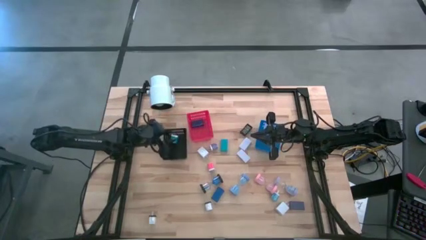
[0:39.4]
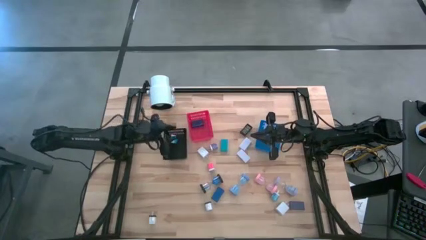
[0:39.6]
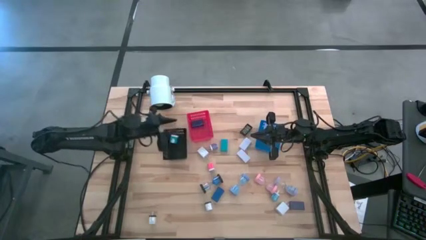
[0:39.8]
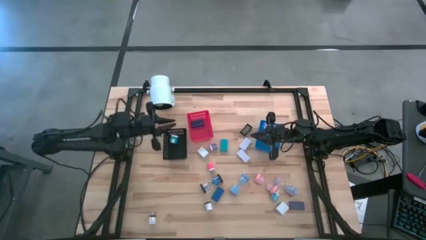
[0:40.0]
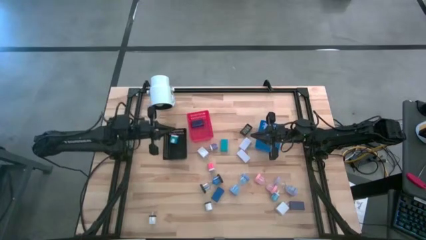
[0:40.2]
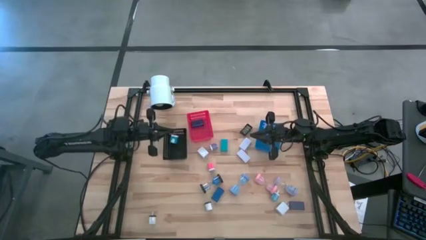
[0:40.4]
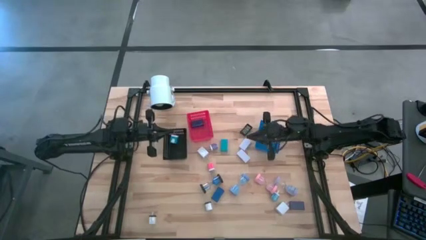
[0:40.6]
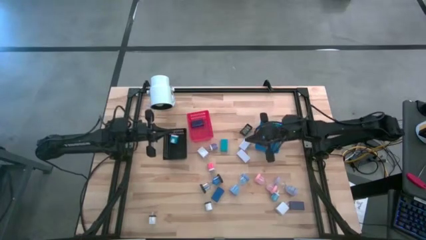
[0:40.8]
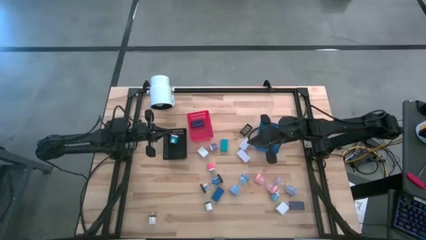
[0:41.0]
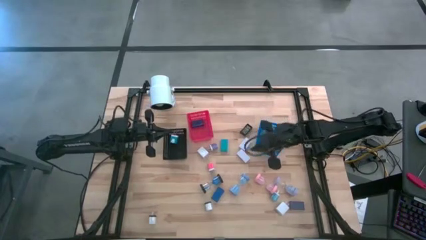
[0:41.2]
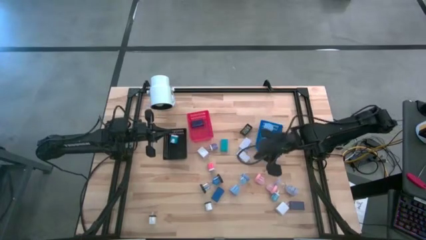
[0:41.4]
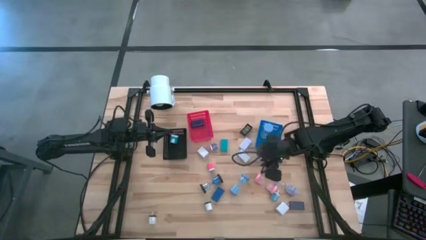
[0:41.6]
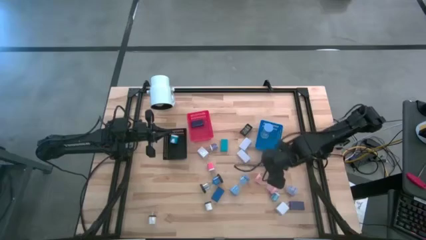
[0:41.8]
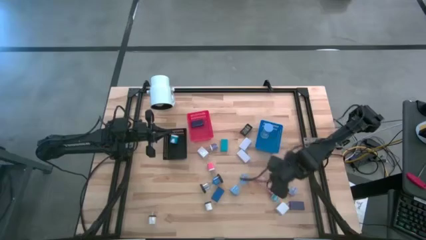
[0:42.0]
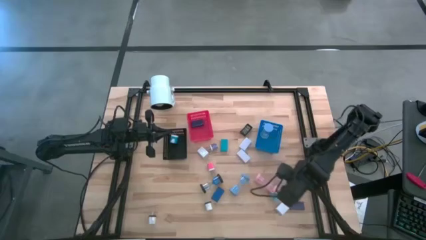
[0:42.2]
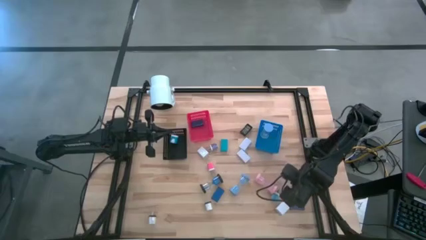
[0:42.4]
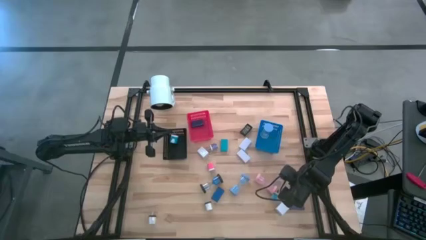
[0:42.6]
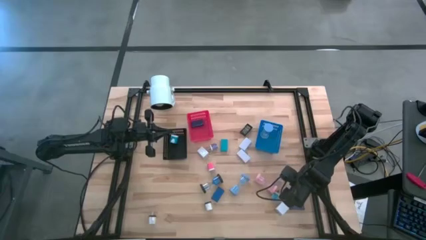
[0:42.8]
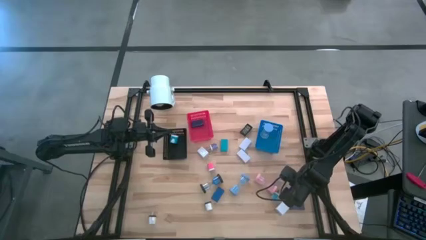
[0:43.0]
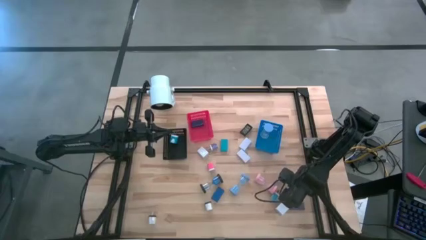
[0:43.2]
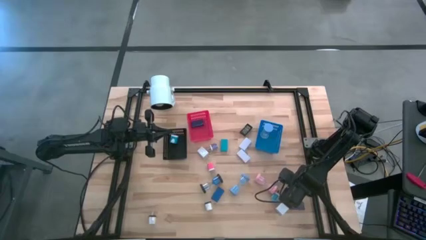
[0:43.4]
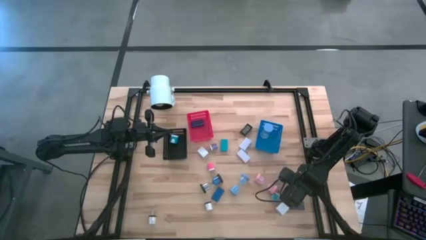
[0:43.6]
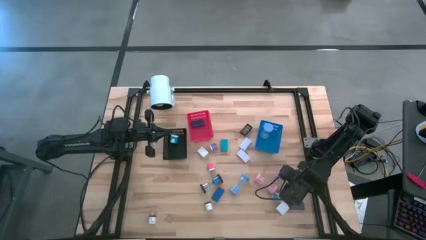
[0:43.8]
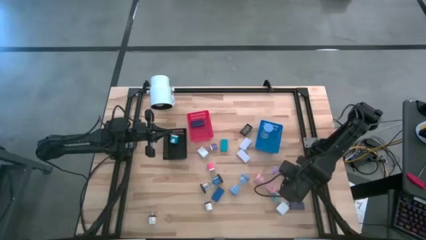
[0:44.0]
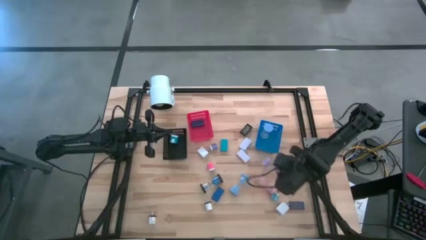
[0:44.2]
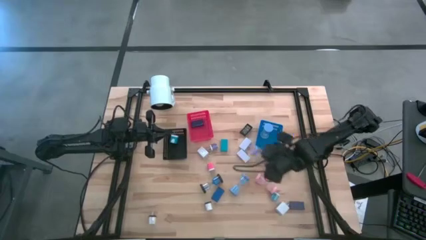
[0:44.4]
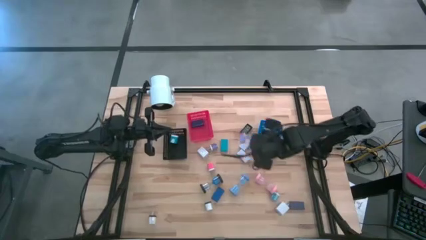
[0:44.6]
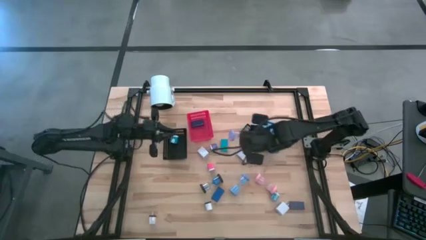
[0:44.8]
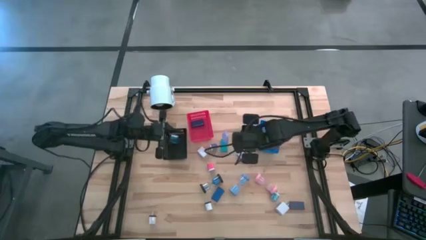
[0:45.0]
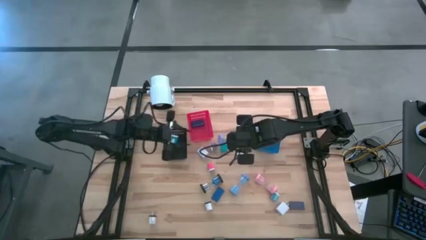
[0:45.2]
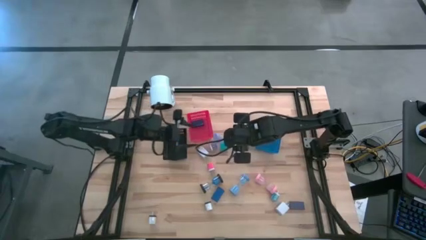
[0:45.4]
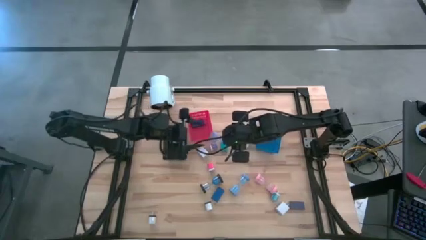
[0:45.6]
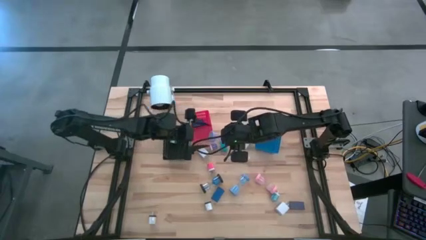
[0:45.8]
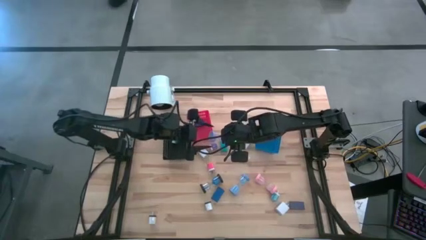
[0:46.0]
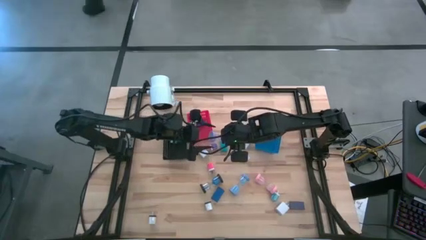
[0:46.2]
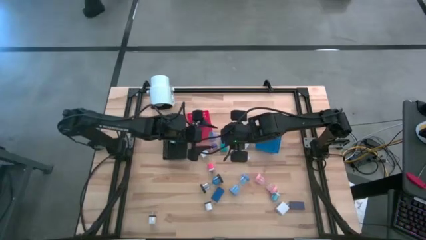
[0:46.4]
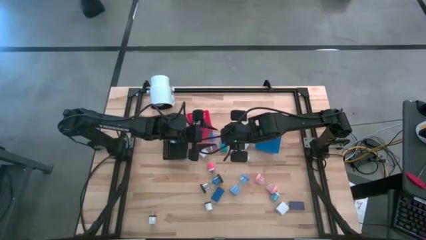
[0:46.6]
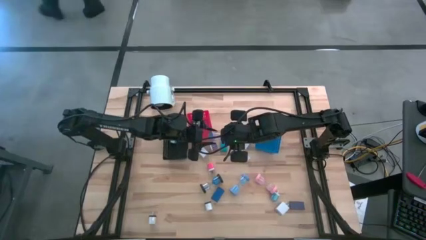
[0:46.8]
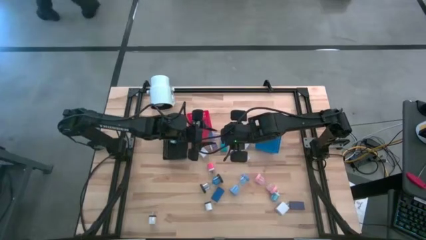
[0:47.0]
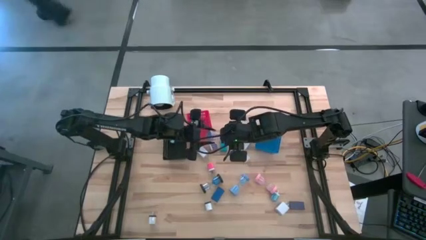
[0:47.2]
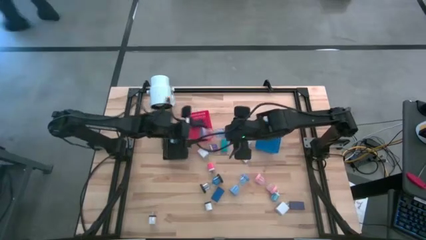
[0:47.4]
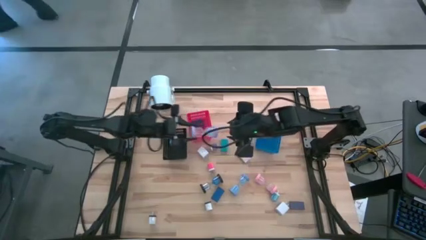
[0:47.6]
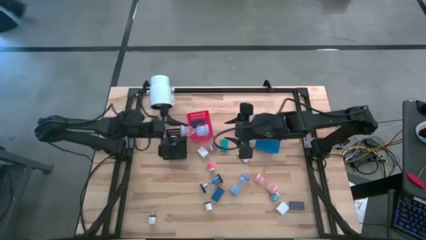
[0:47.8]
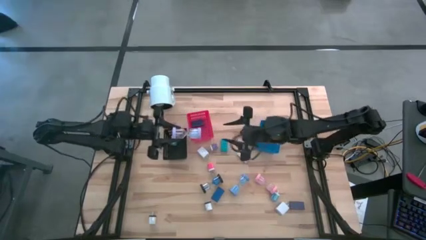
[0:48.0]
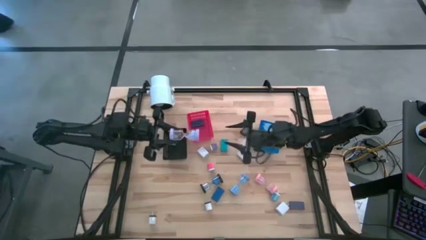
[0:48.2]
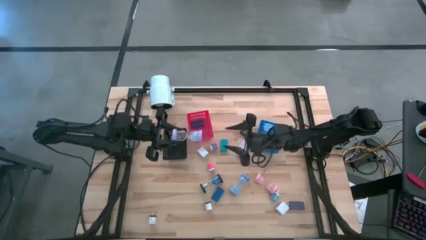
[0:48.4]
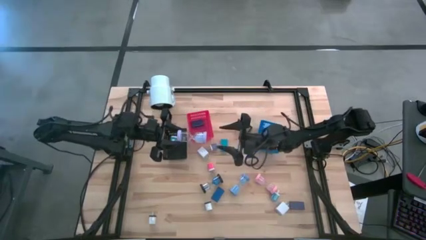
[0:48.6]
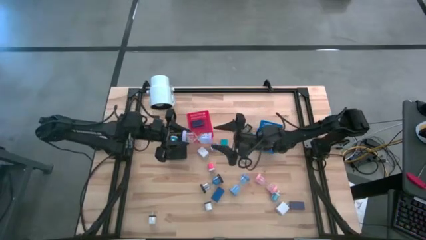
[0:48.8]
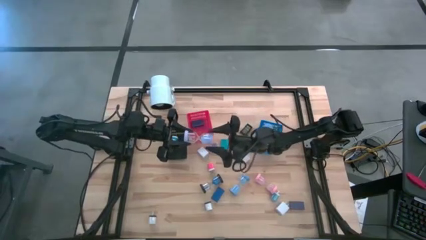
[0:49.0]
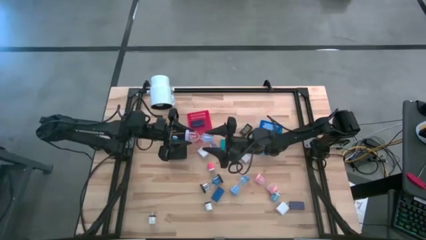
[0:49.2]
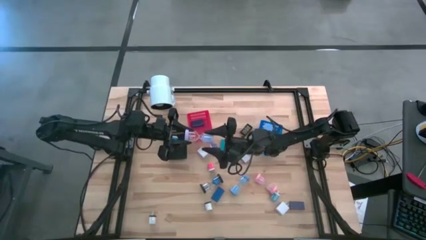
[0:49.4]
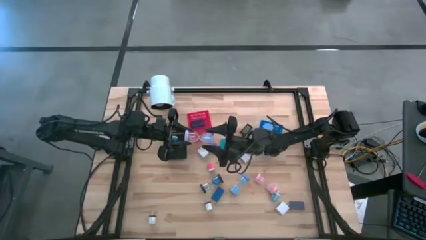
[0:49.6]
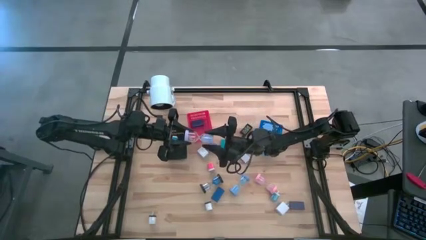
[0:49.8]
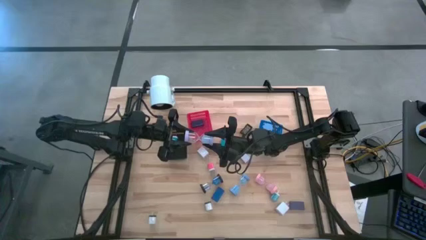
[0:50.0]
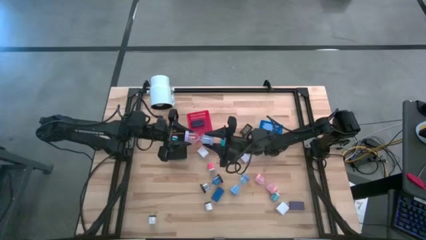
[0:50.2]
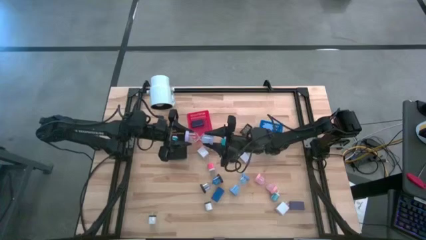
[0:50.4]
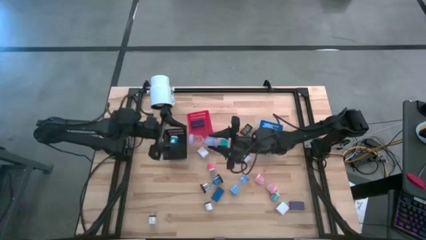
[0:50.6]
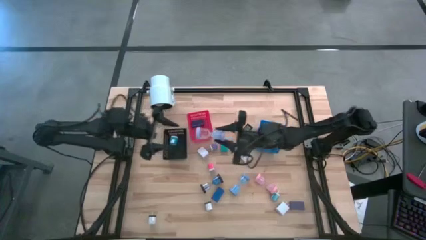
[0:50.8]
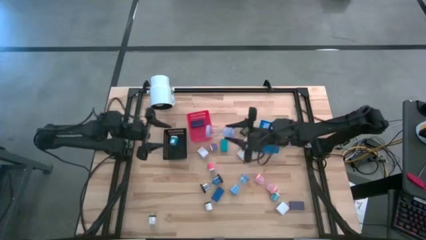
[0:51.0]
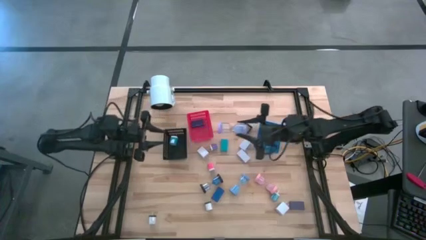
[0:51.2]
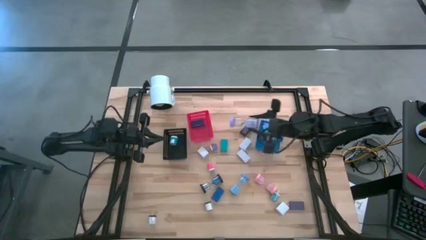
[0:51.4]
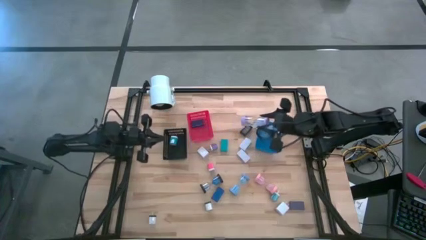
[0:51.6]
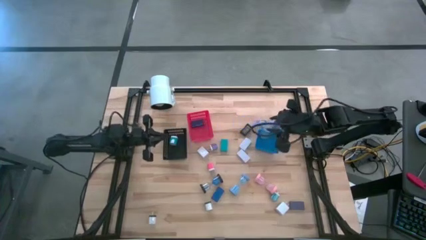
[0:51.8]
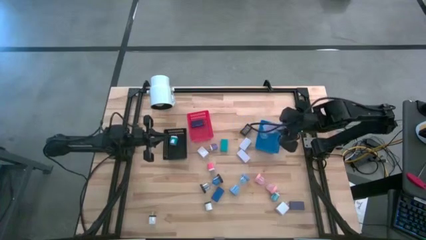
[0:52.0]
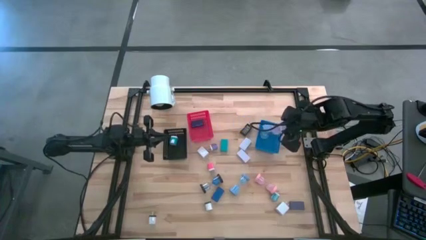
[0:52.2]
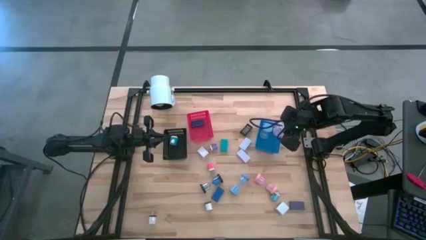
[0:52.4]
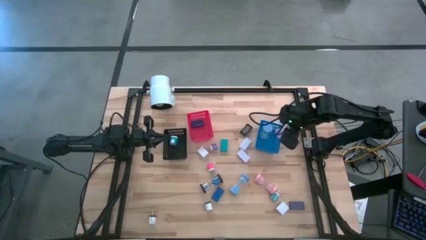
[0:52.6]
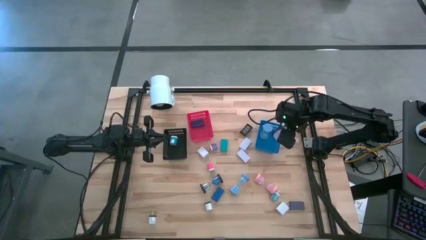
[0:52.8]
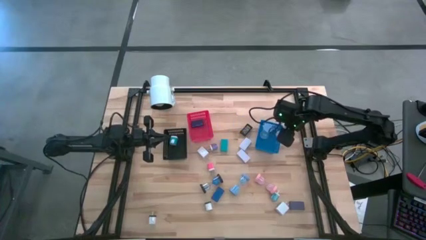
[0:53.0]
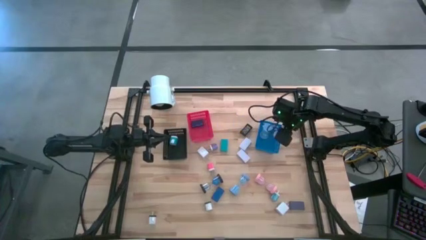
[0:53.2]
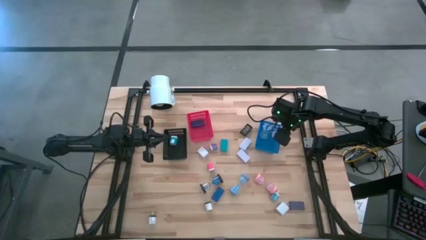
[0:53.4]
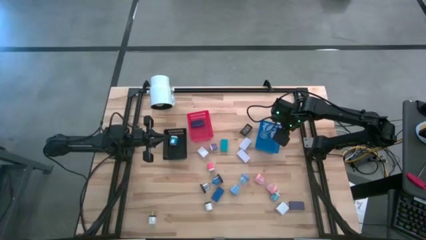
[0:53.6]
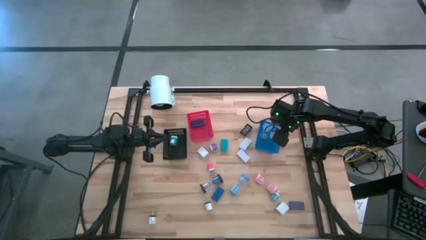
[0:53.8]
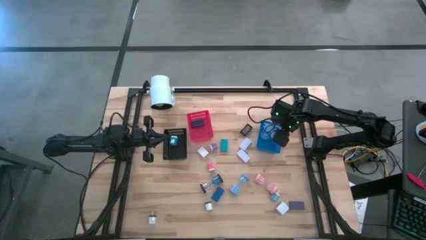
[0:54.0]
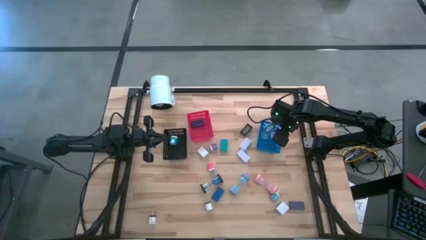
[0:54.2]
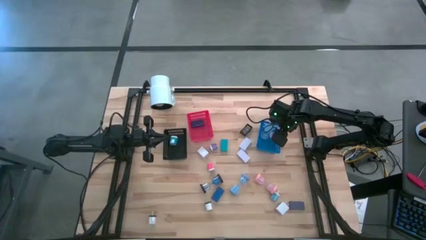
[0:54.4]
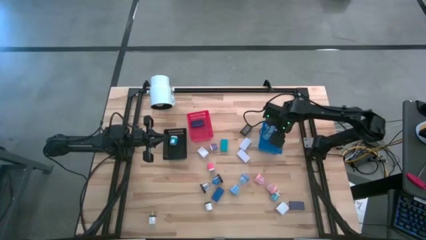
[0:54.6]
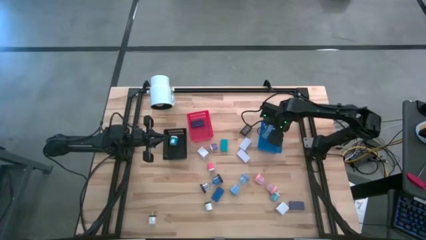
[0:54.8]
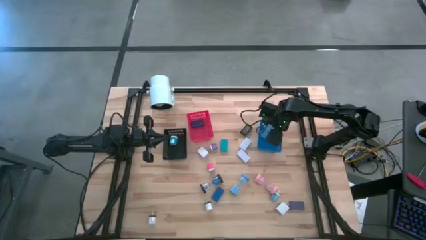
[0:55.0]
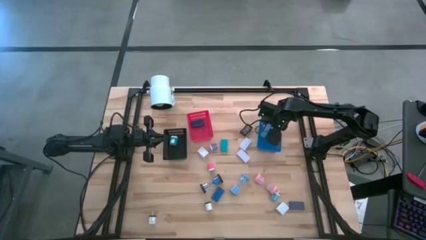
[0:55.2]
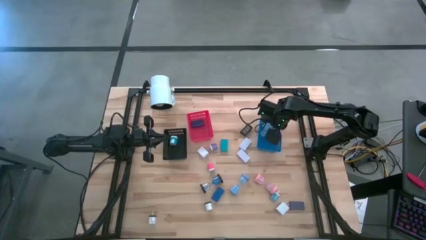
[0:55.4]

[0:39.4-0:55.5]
Task: Pick & Place Office items
Put the violet hourglass into the blue bin
